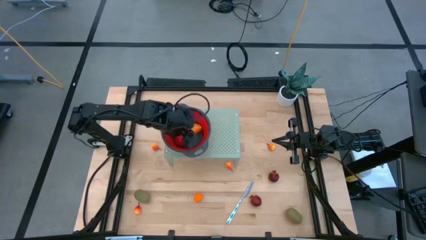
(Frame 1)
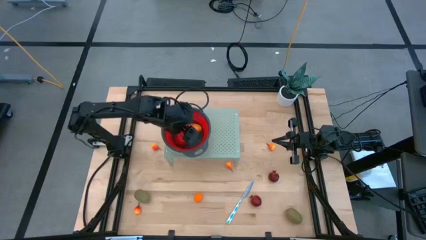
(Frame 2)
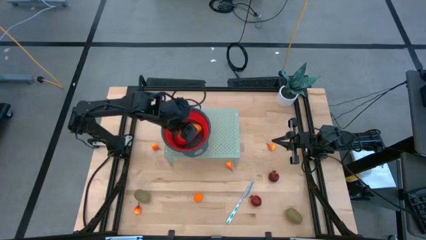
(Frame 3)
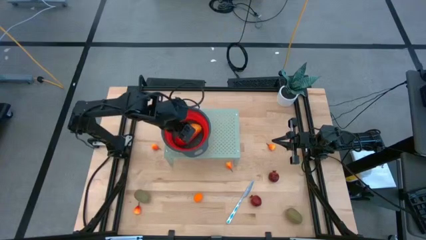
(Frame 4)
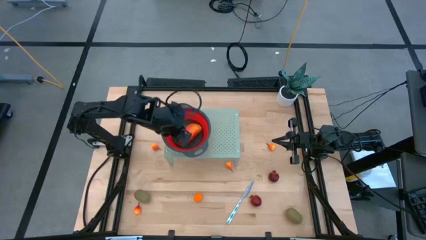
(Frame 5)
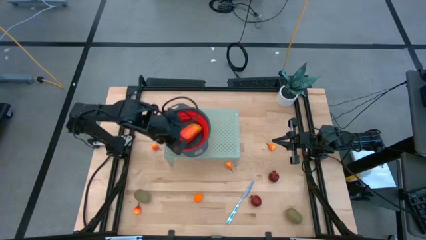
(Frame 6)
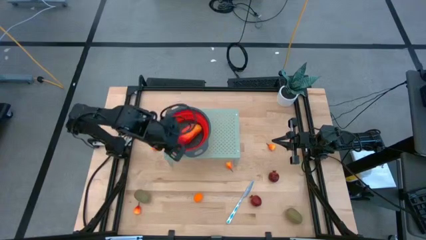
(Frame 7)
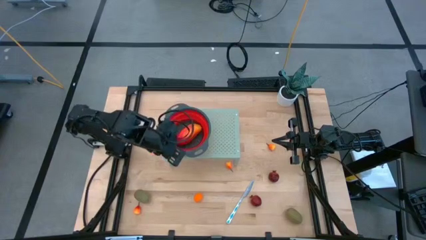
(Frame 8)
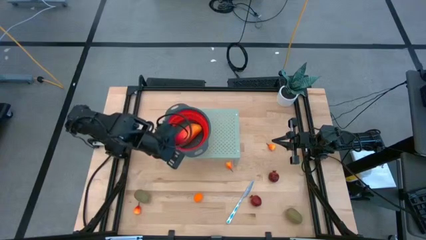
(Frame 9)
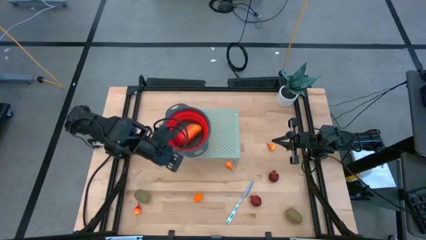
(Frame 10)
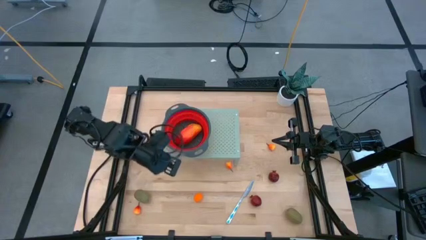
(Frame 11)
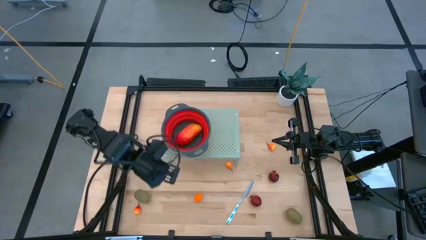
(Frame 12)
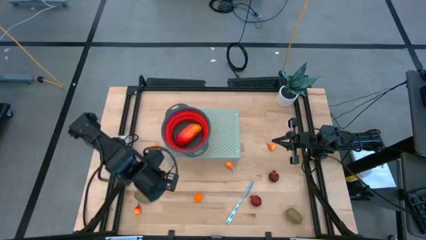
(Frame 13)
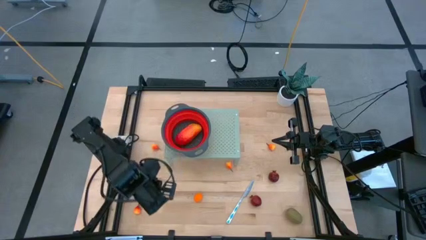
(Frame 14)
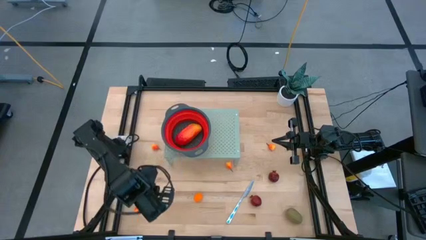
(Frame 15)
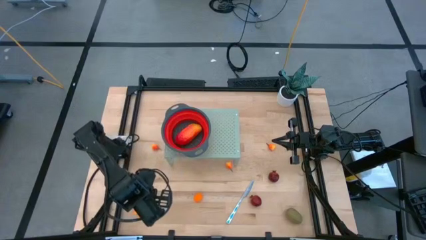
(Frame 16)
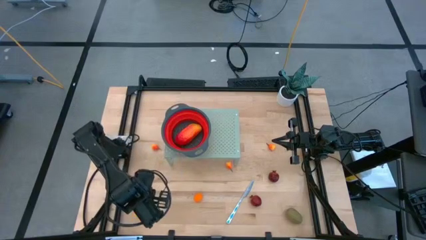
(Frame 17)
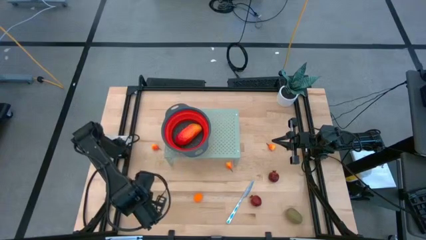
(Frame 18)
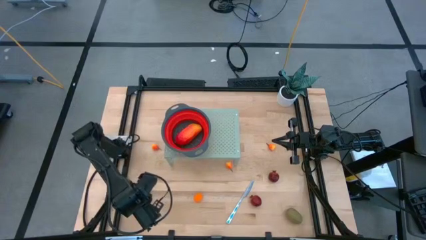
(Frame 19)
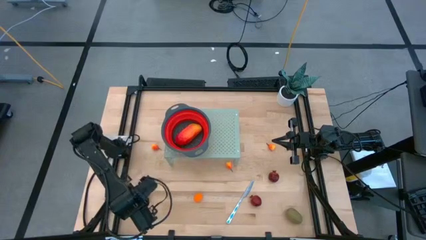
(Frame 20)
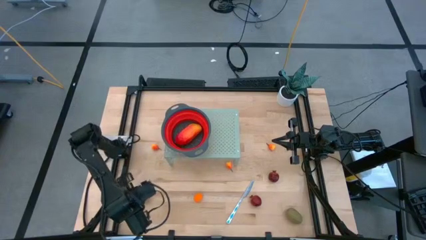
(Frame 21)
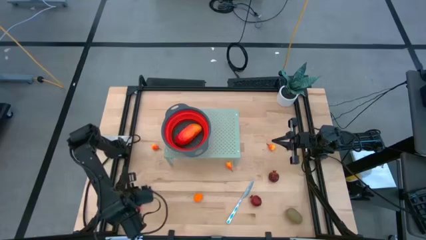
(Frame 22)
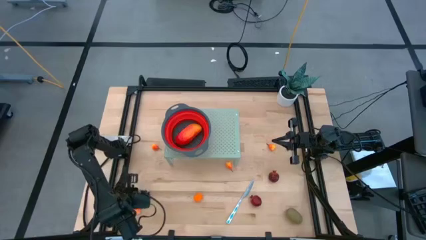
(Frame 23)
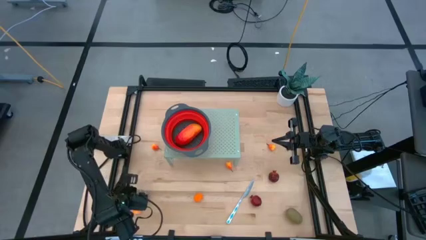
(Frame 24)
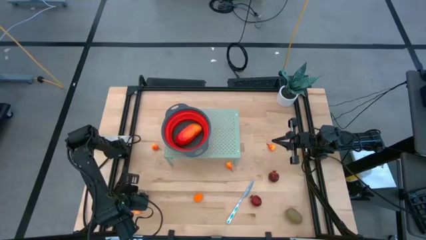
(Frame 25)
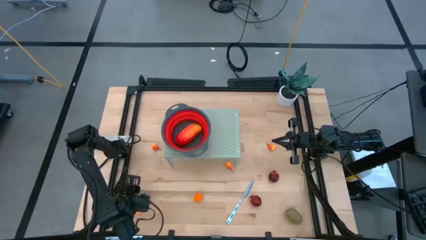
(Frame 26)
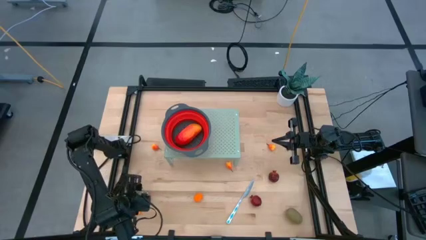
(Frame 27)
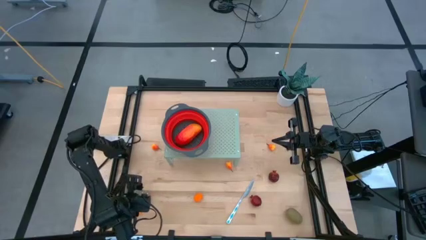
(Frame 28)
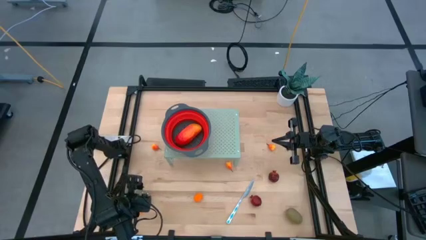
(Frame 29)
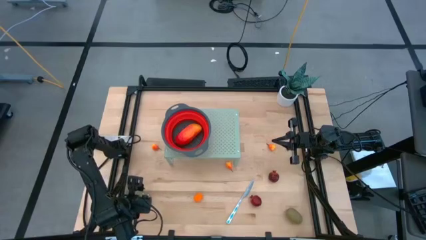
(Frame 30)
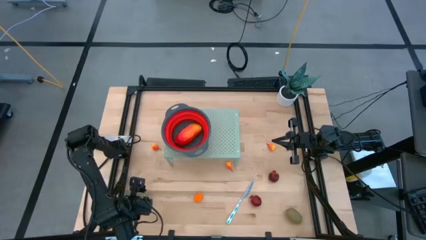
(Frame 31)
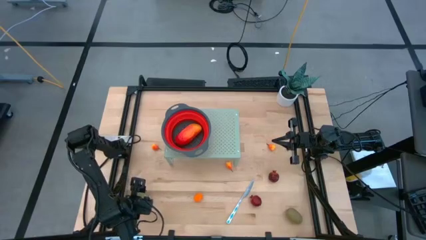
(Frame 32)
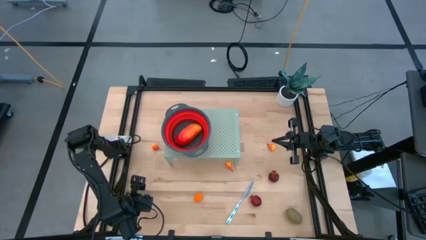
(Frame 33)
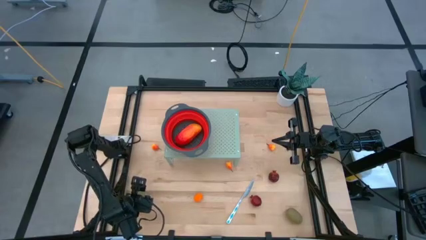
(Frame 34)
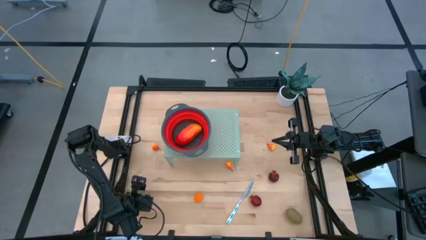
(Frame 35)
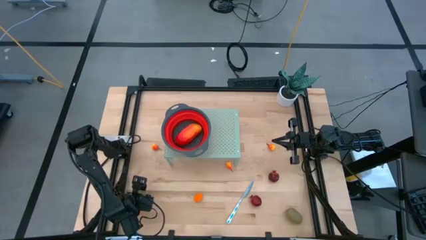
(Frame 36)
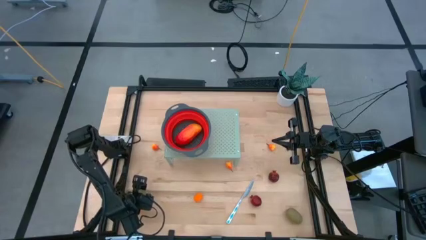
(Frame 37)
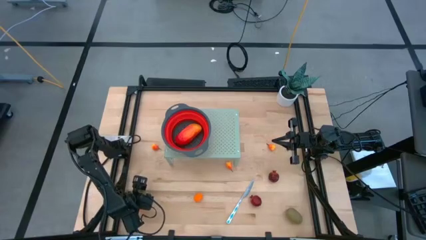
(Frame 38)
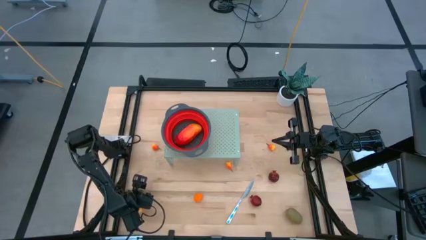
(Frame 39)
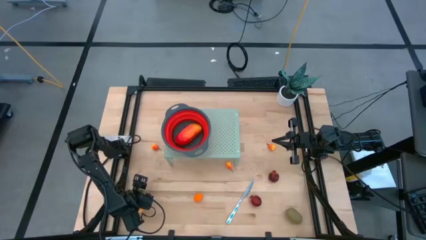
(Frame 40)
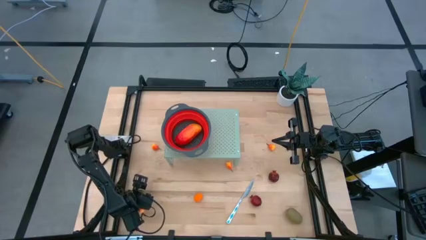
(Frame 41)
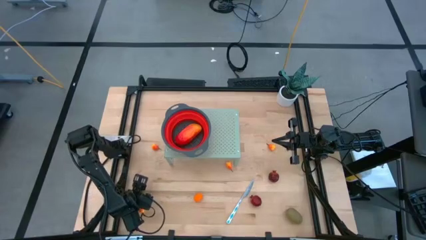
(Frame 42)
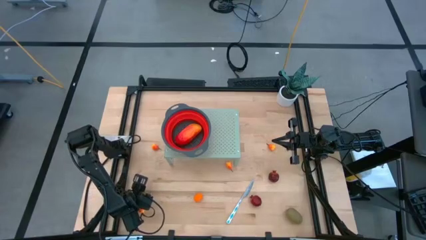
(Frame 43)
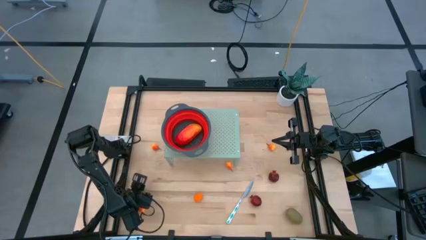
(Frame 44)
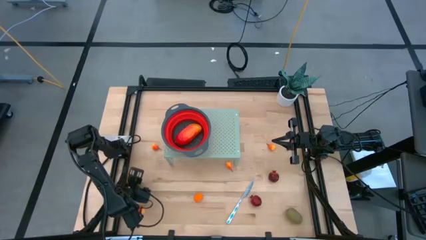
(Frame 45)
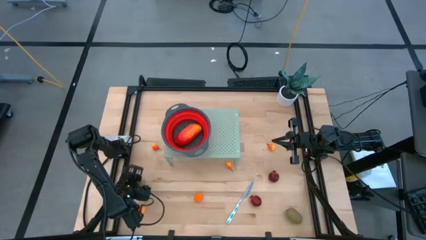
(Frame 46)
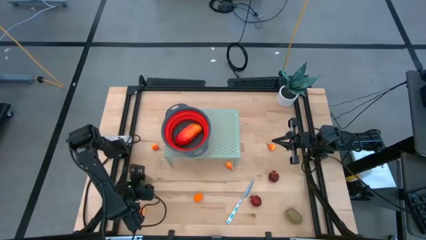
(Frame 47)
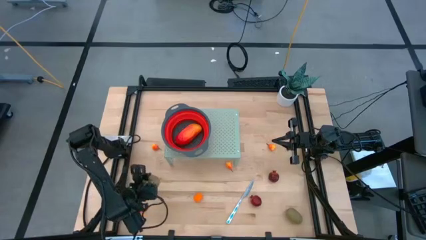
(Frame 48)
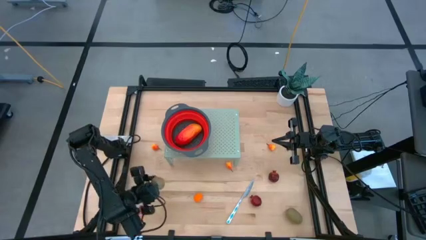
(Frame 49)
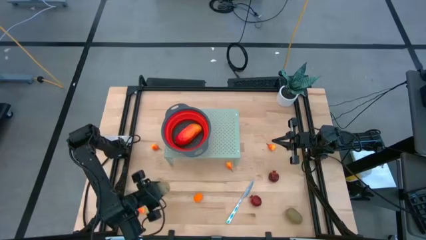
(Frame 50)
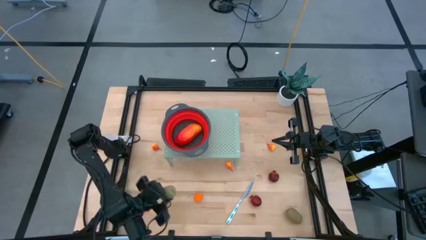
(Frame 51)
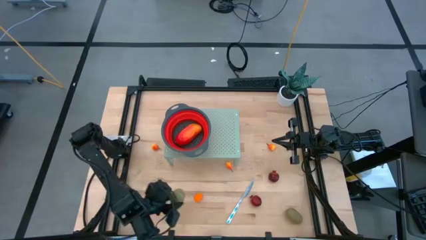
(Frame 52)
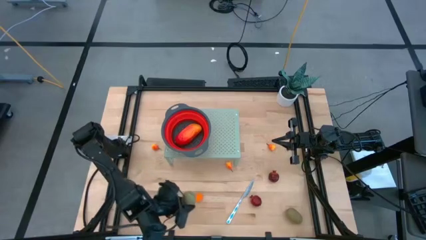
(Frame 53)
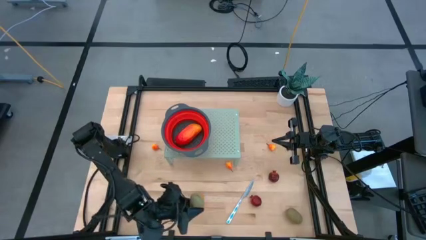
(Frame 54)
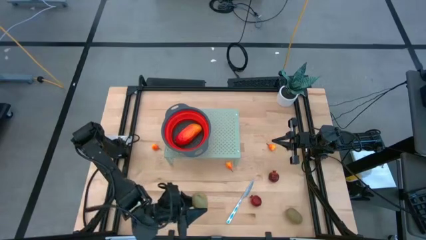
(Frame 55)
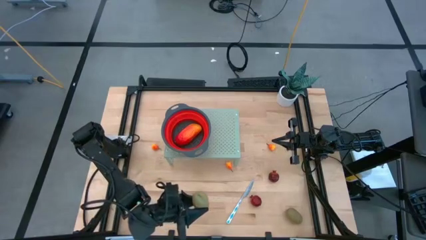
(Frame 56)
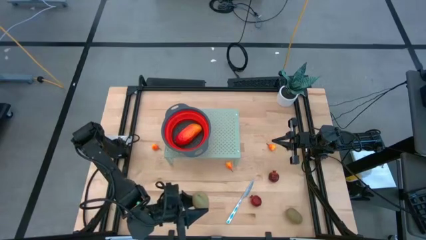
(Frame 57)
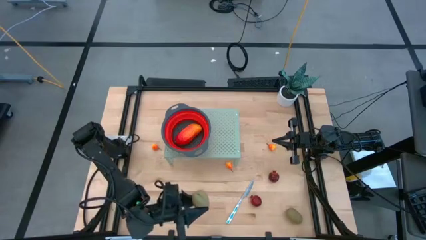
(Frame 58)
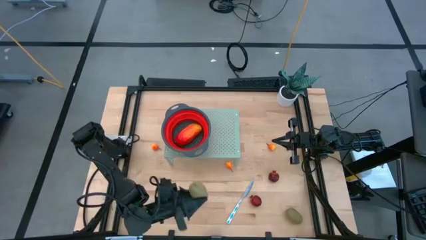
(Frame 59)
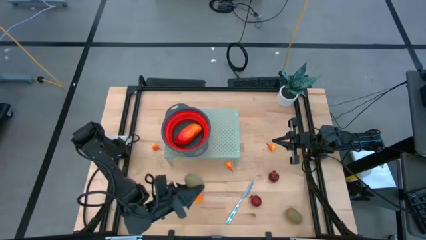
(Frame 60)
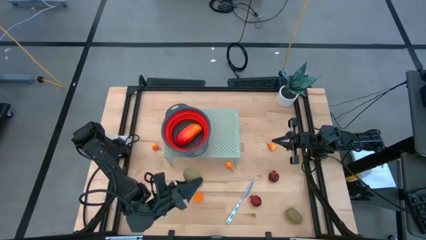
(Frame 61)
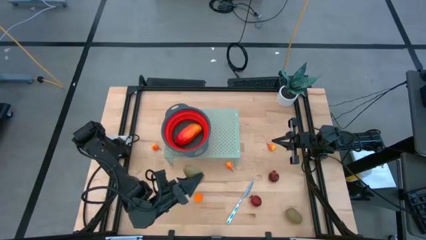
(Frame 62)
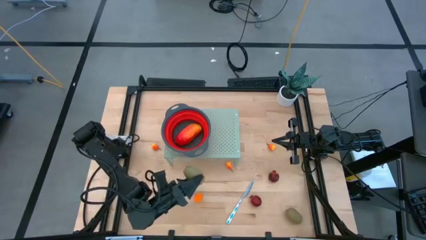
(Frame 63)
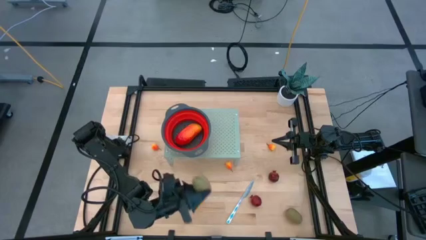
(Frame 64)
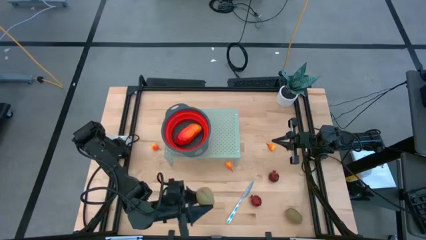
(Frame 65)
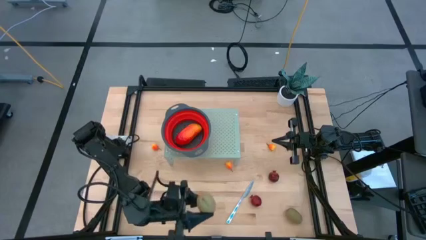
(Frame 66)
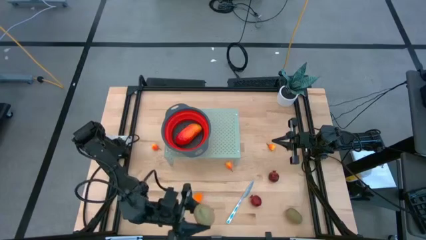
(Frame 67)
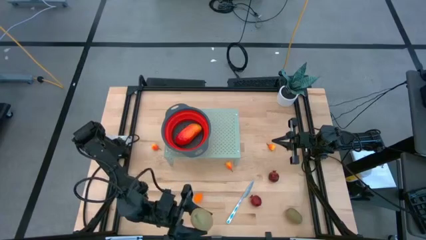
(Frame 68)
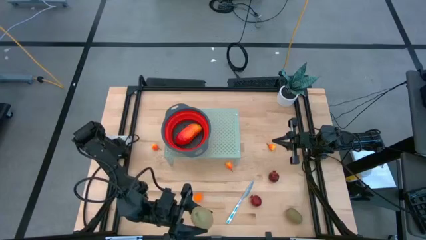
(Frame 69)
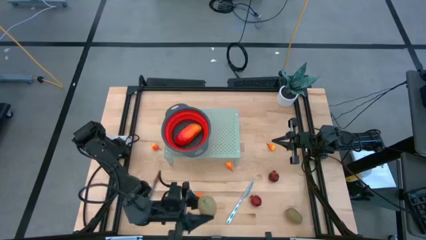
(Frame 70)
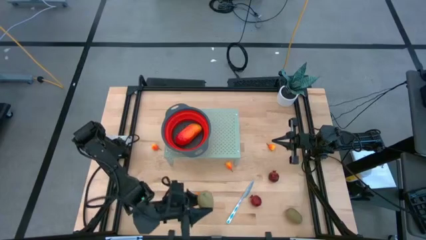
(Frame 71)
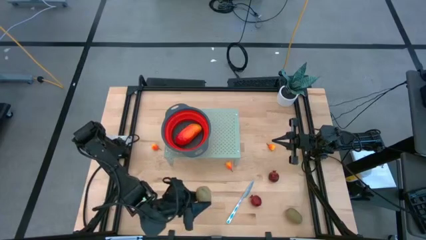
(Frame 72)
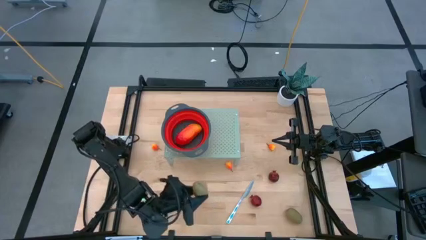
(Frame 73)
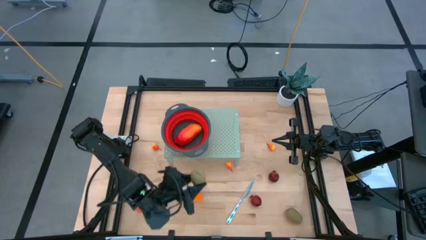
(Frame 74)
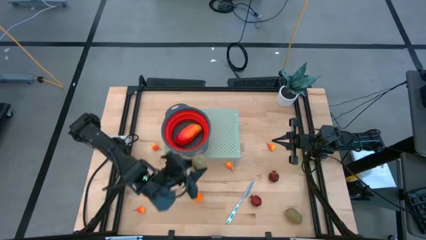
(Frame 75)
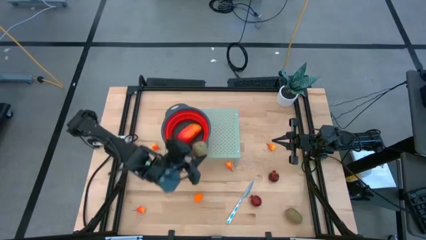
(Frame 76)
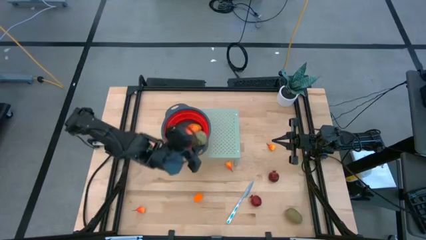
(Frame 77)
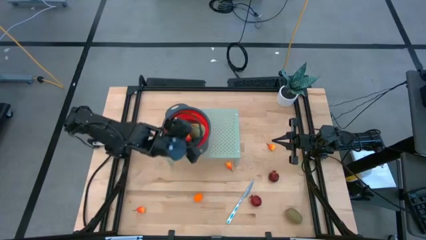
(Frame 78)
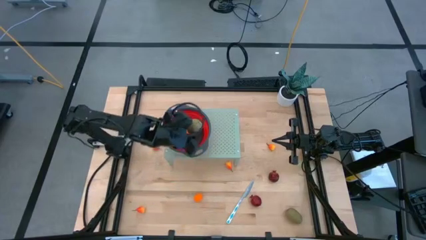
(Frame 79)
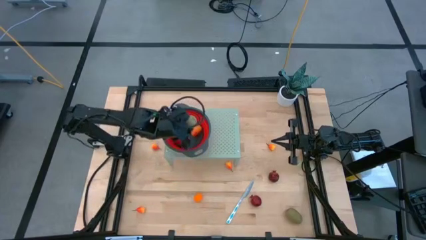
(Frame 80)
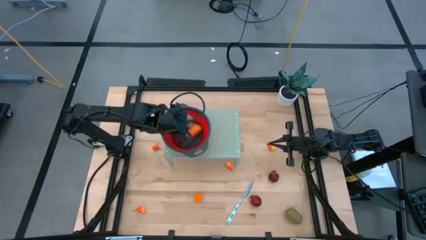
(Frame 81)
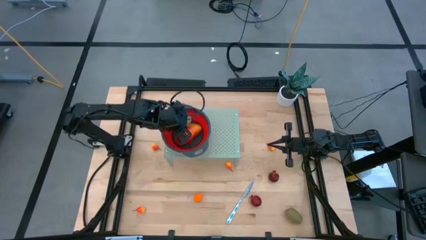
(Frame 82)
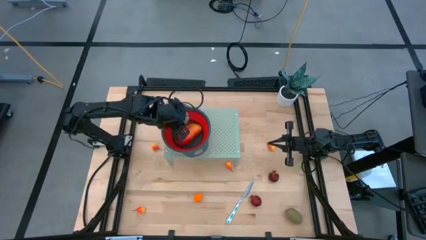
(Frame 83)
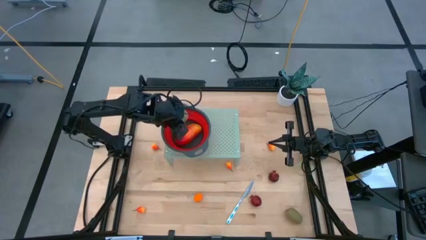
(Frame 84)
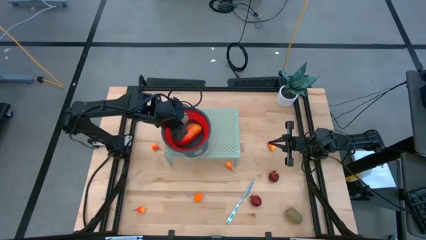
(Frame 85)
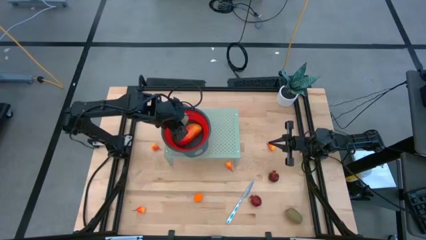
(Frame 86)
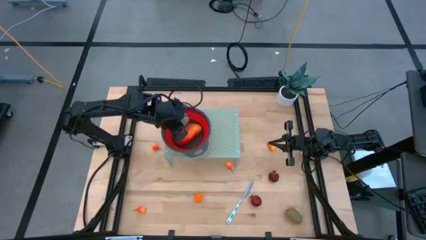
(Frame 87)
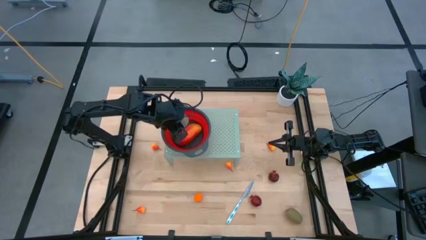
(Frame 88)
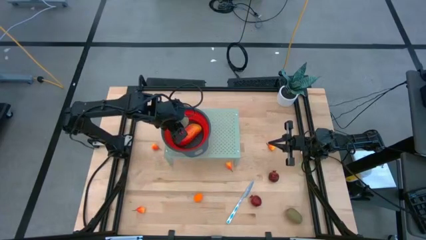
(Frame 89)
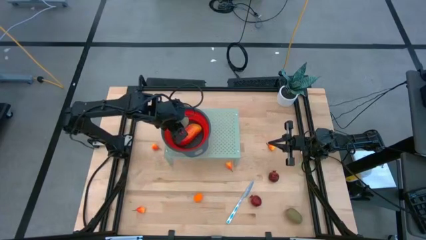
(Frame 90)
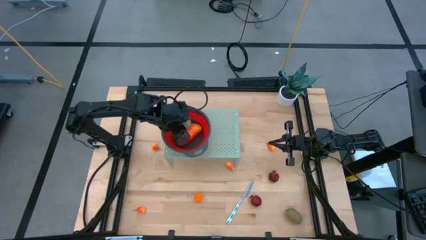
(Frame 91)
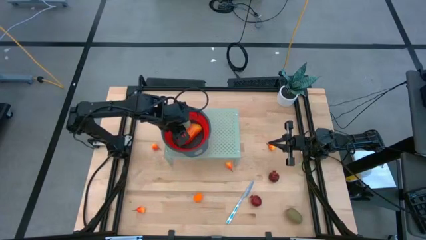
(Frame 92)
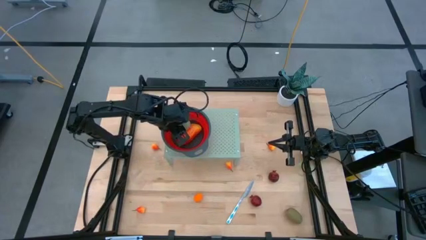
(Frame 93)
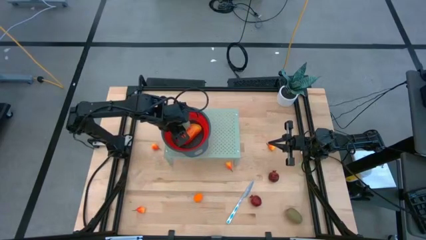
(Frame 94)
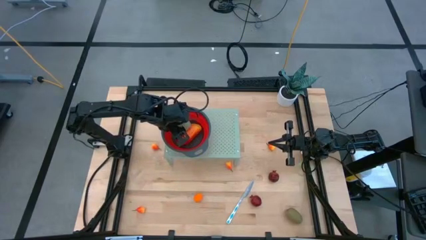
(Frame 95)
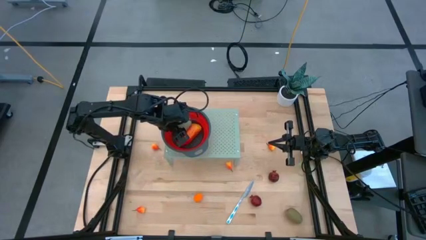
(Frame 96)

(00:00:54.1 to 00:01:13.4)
Task: Pick & Place Fruit
Put the kiwi into the red strainer bowl on the shelf
